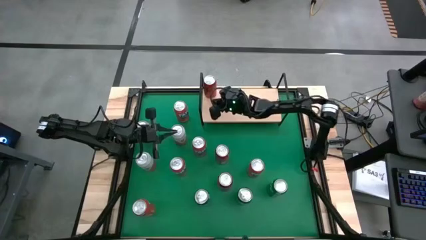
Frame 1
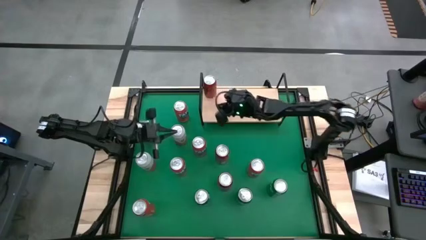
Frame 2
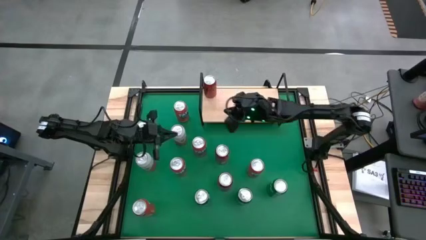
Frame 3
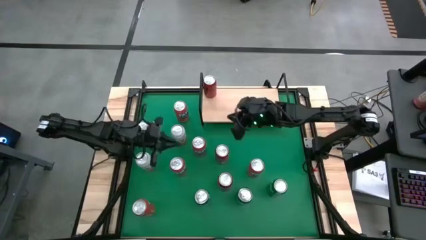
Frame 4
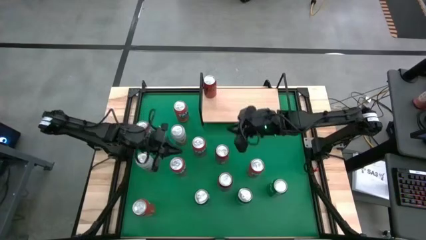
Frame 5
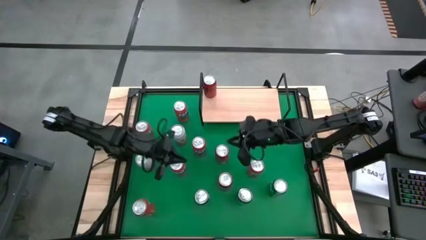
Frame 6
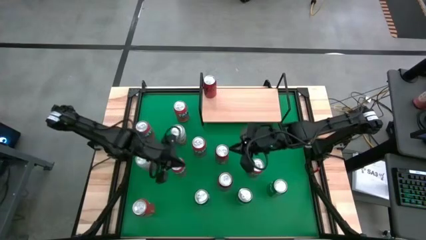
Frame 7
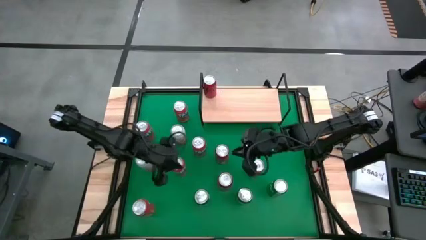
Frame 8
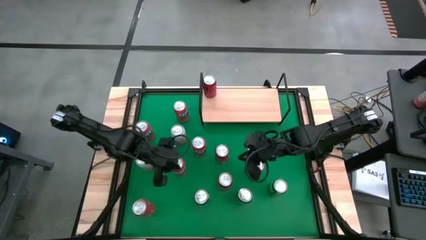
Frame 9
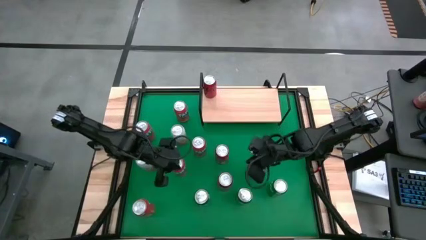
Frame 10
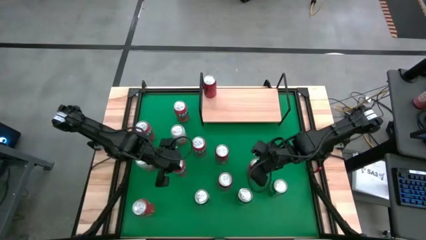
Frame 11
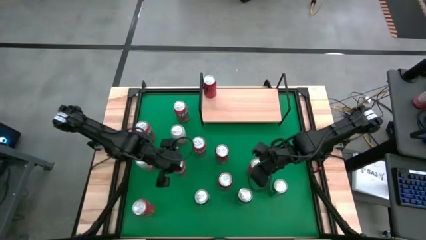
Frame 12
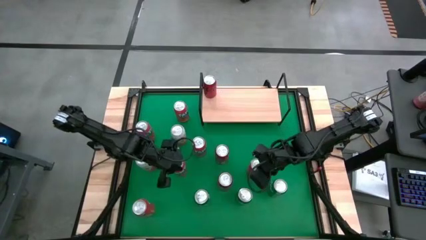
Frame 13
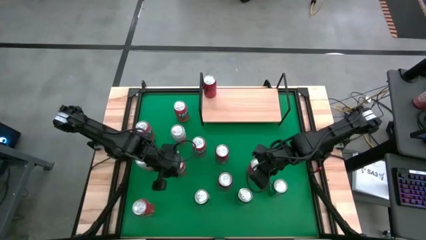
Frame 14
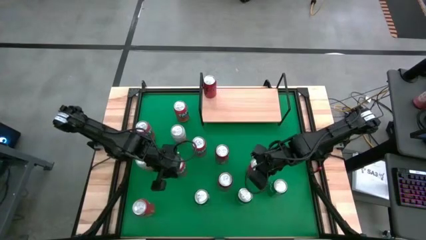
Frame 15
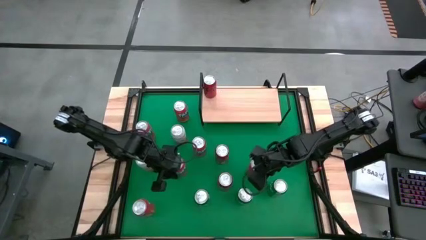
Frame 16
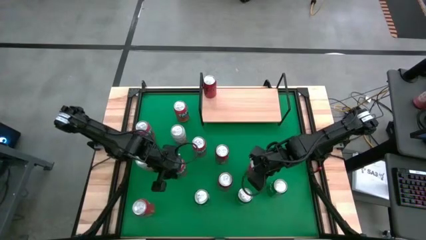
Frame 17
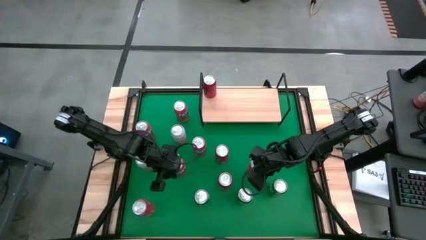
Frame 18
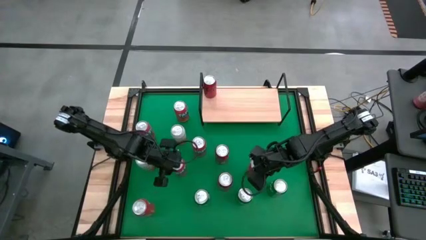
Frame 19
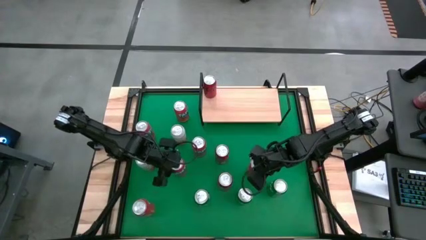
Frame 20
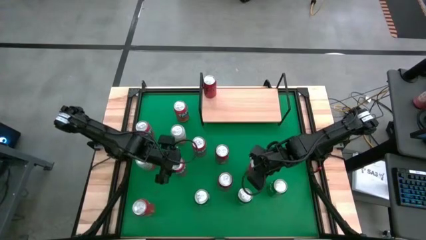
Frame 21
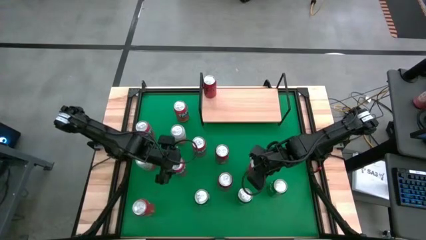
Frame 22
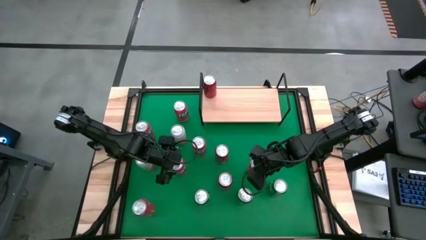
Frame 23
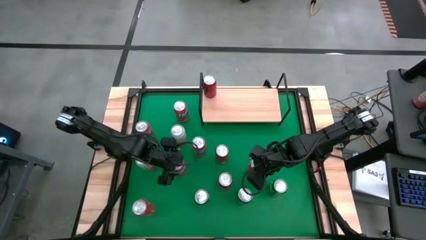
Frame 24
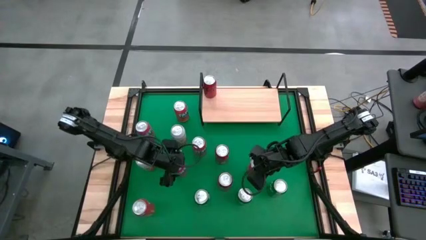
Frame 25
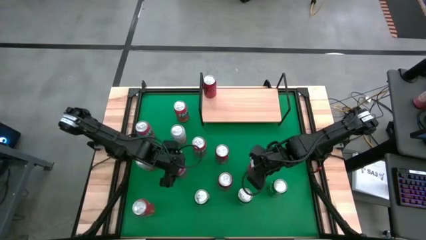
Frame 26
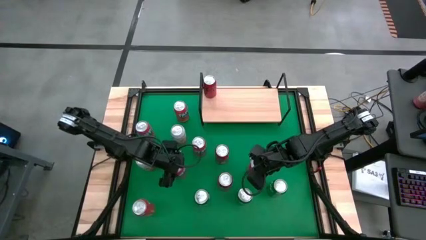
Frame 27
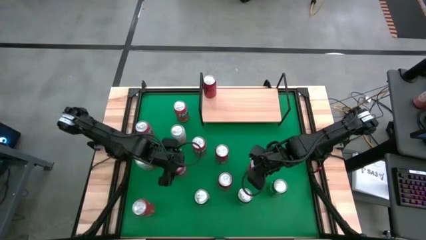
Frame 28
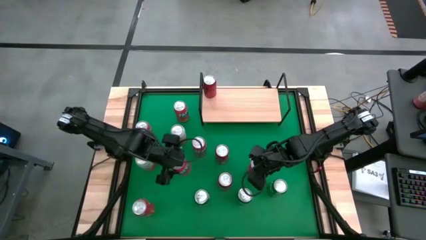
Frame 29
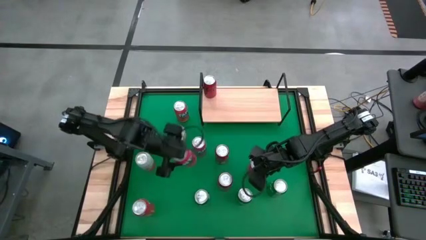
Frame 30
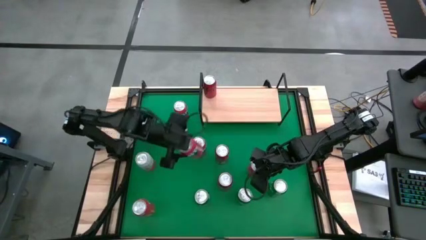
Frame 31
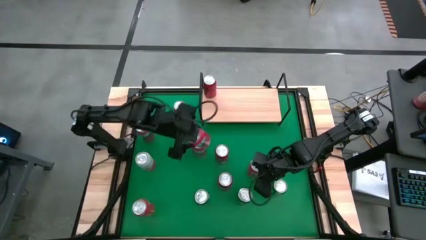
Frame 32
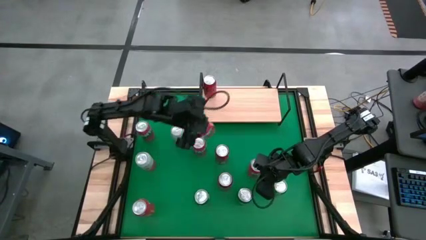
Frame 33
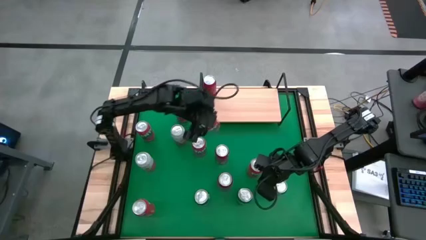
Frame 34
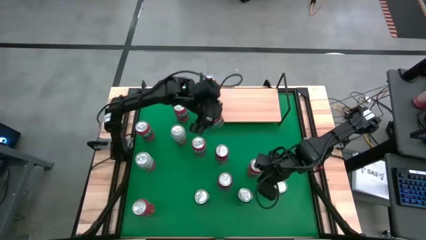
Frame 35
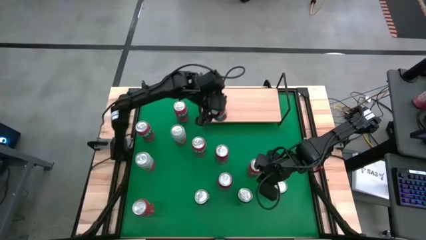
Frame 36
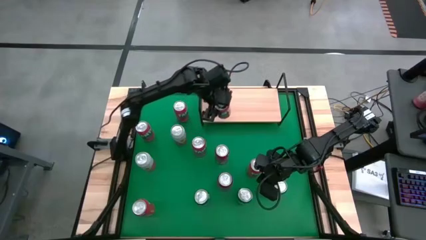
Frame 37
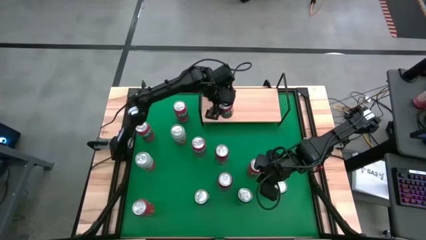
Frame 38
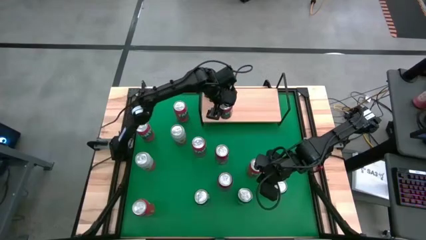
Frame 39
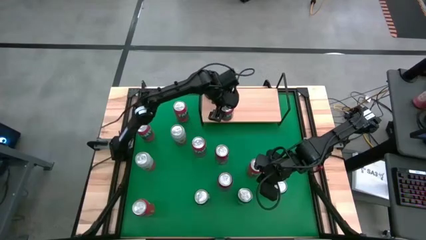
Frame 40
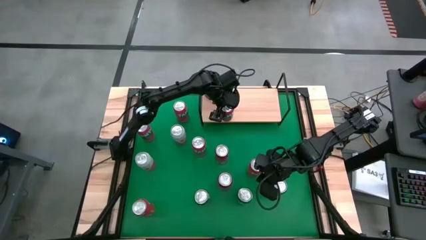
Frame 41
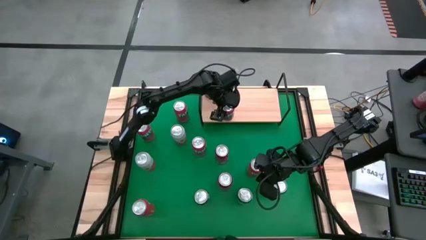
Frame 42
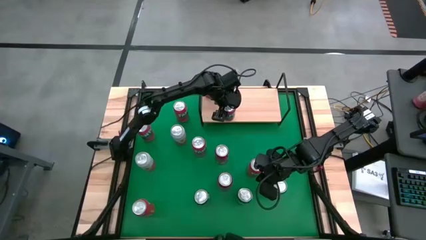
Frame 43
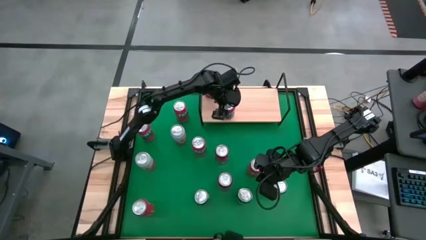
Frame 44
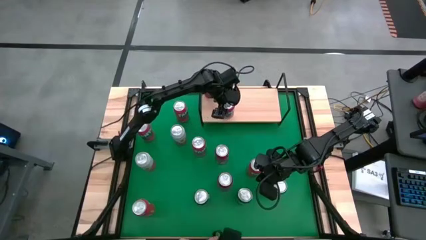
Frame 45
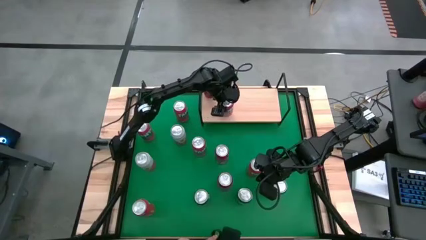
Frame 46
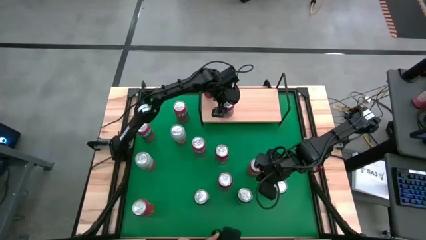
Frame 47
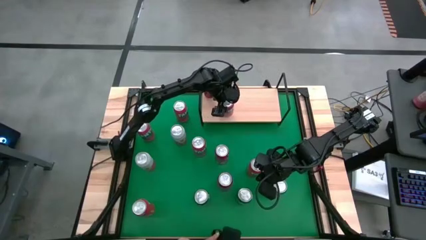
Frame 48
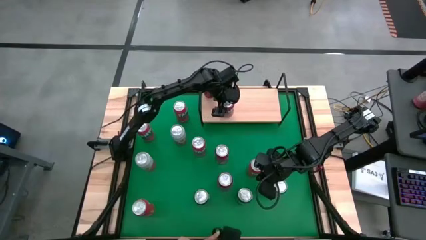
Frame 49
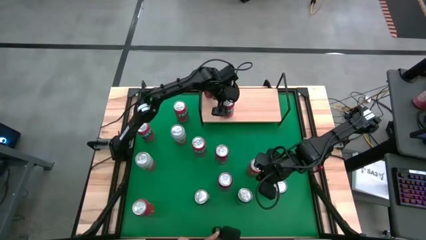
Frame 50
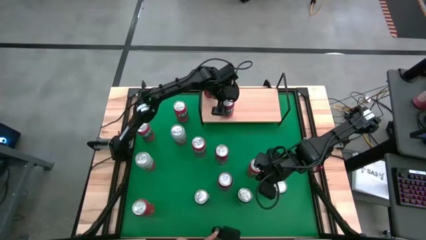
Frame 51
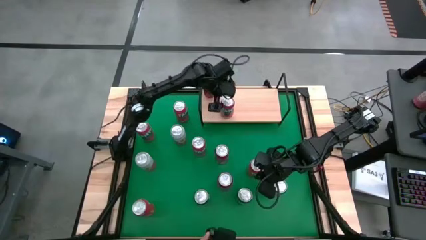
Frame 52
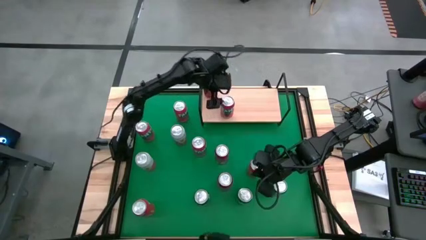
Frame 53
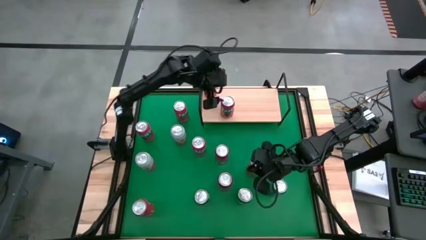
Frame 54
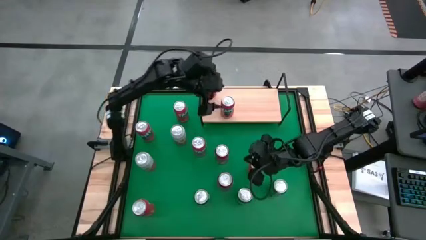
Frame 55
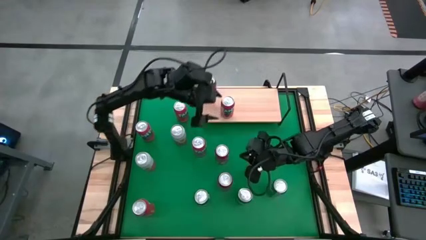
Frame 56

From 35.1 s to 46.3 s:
Task: Place canned beverage on shelf
Put the red soda can on the shelf
